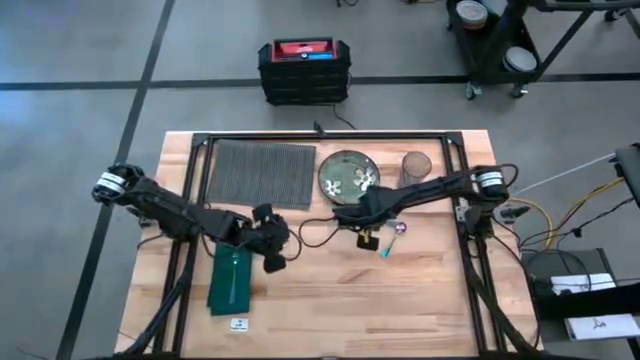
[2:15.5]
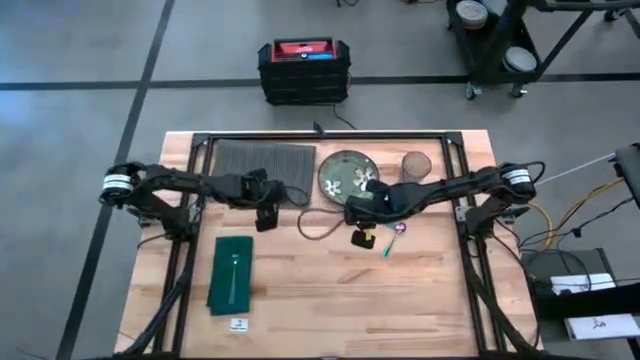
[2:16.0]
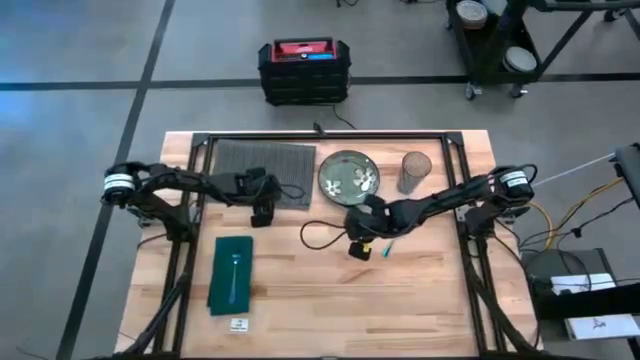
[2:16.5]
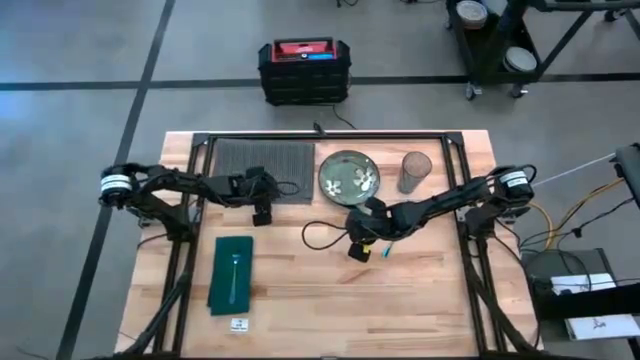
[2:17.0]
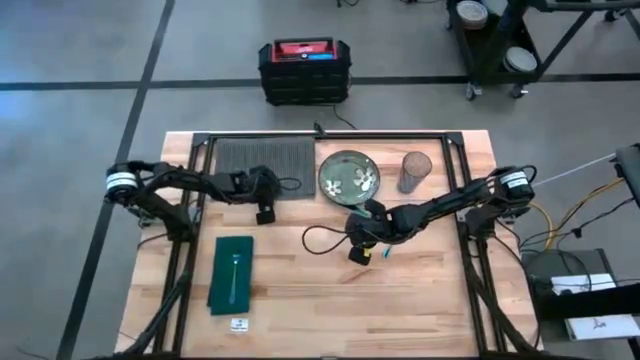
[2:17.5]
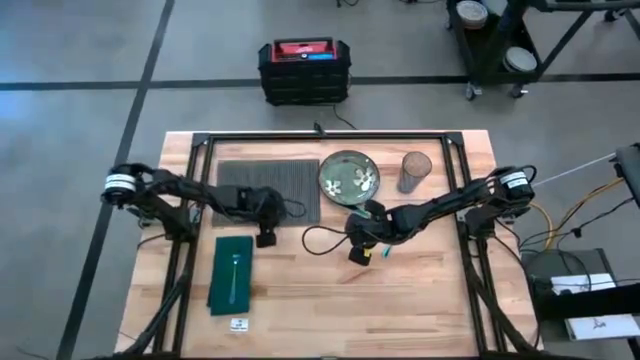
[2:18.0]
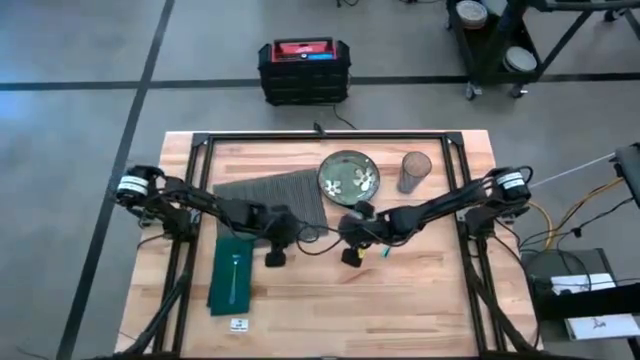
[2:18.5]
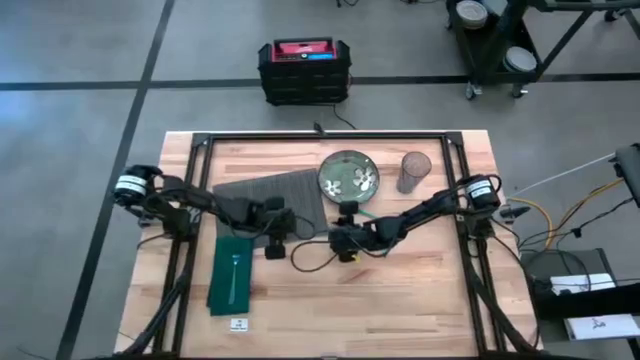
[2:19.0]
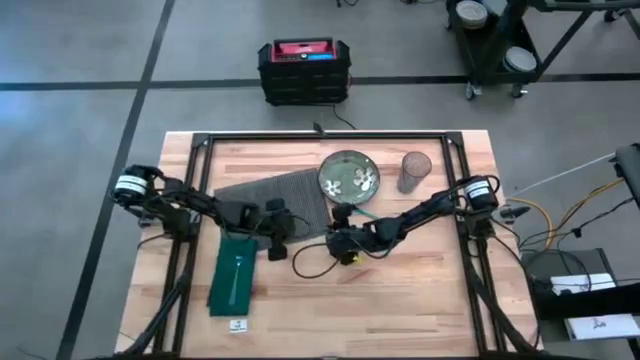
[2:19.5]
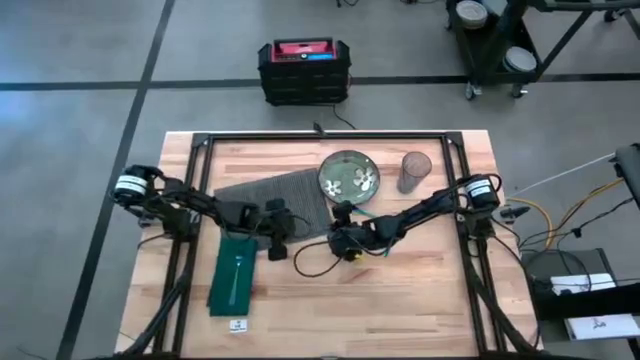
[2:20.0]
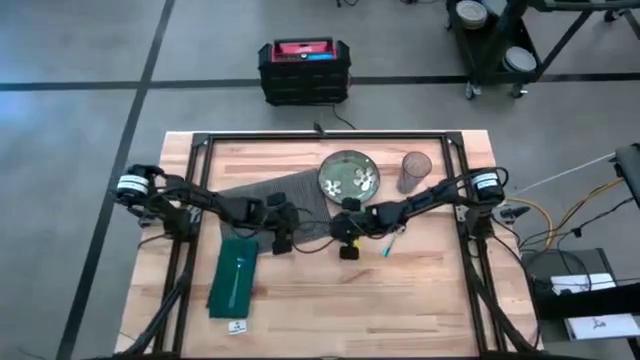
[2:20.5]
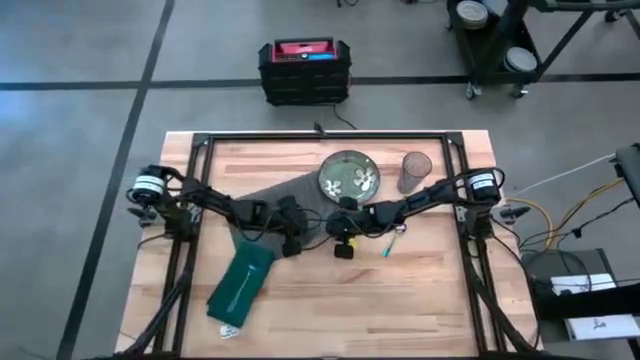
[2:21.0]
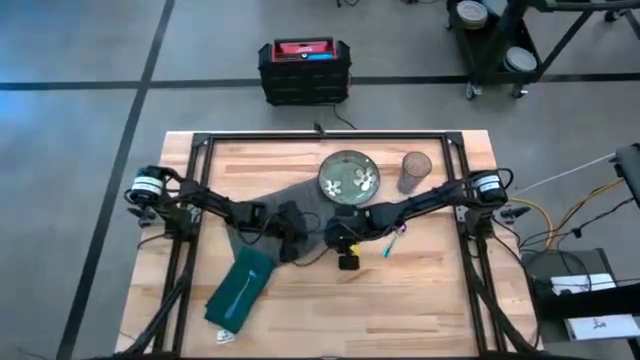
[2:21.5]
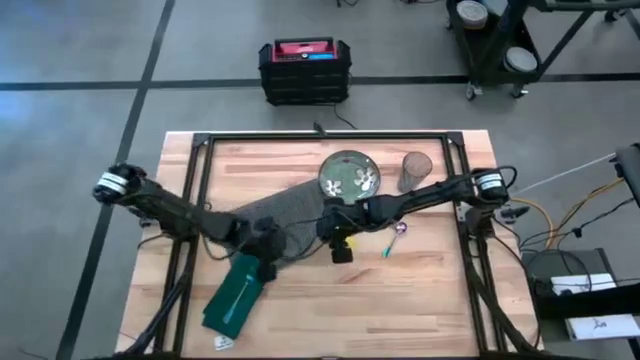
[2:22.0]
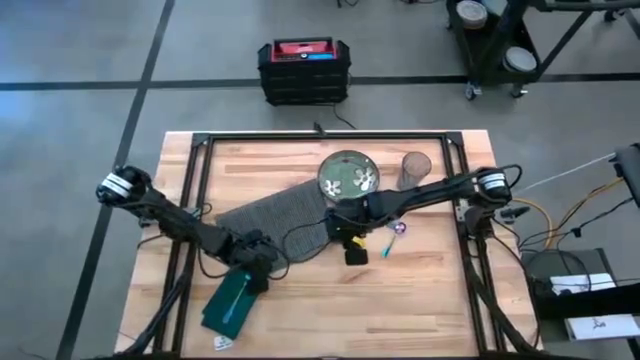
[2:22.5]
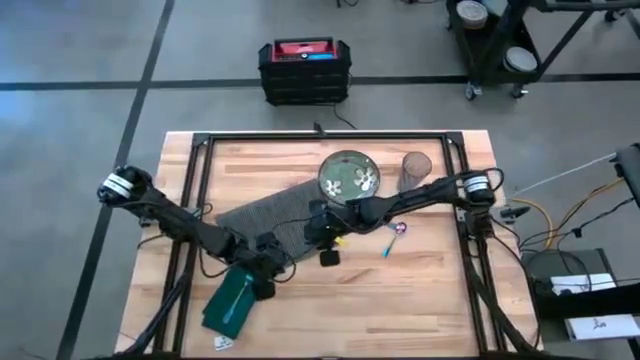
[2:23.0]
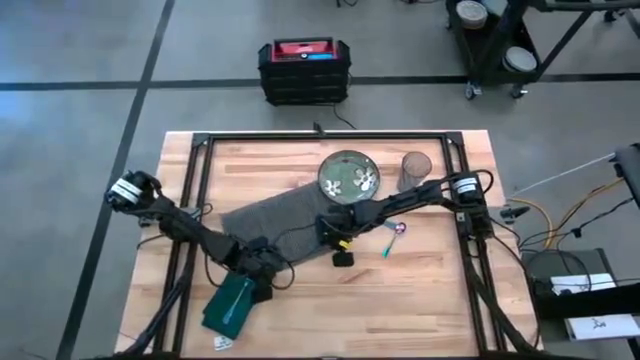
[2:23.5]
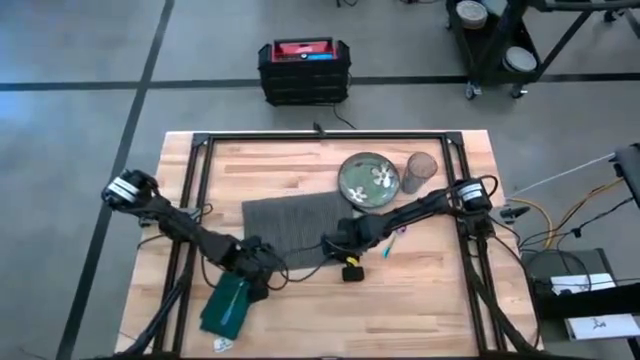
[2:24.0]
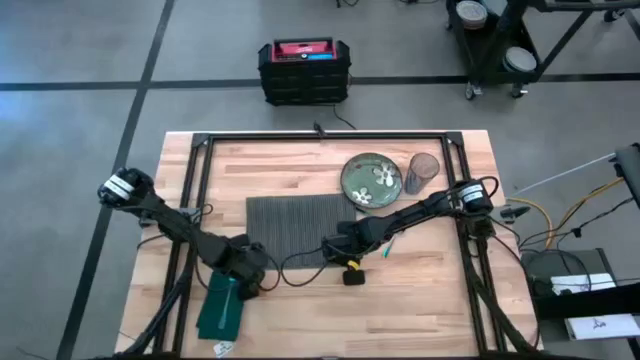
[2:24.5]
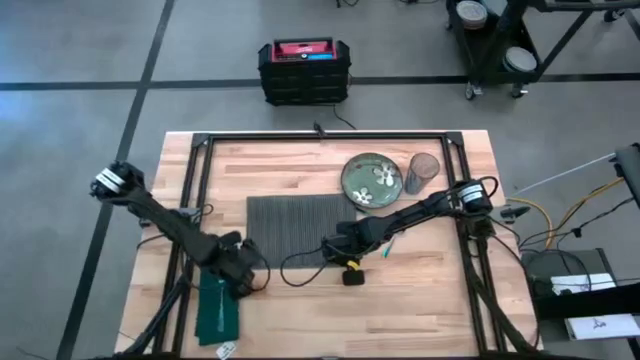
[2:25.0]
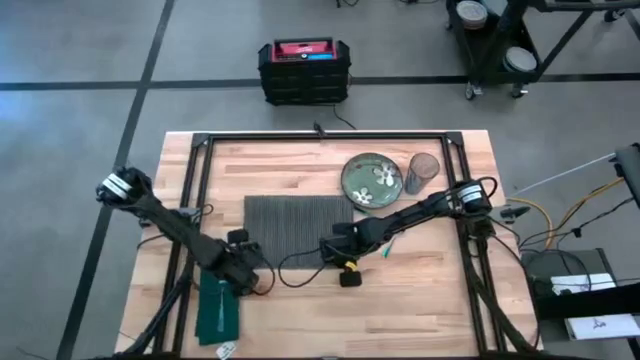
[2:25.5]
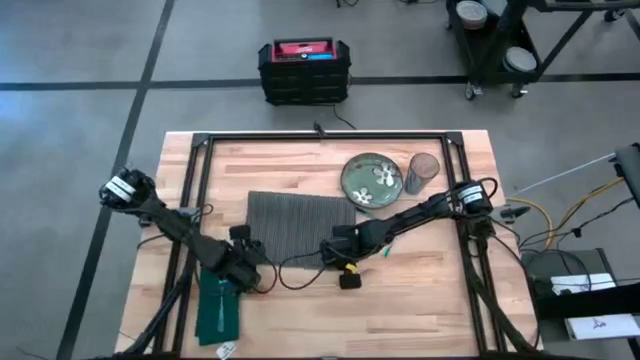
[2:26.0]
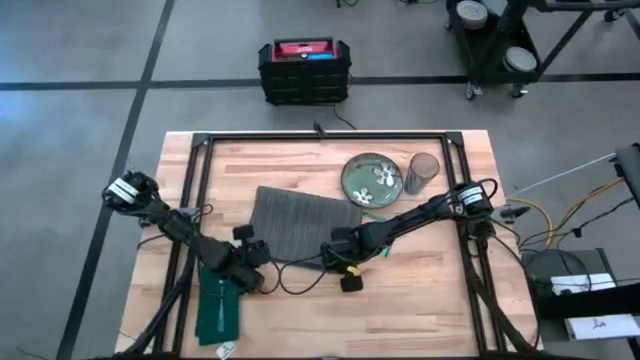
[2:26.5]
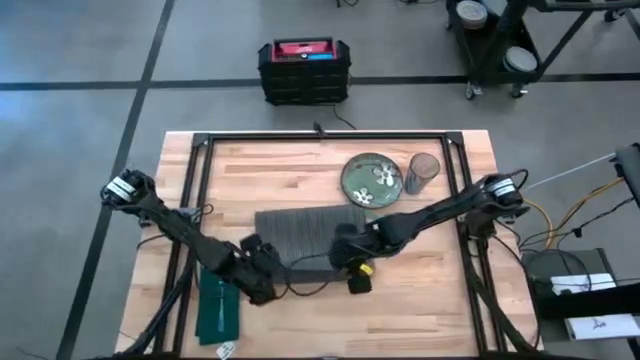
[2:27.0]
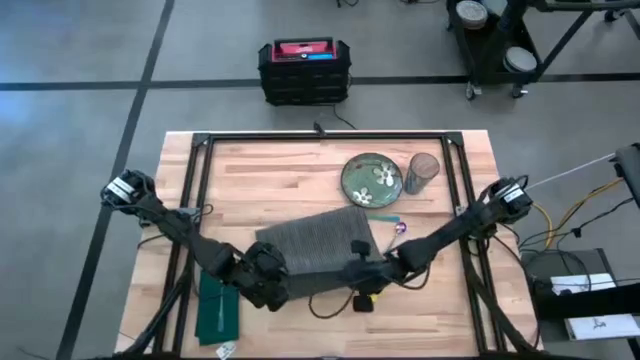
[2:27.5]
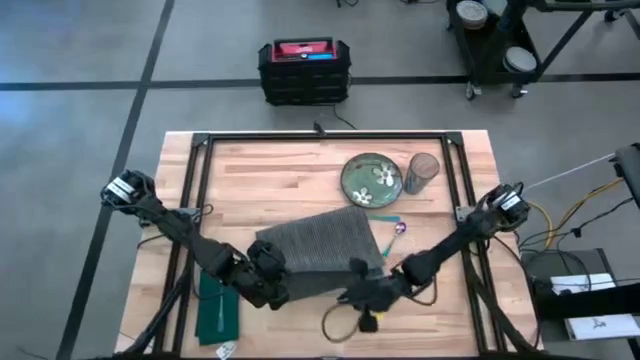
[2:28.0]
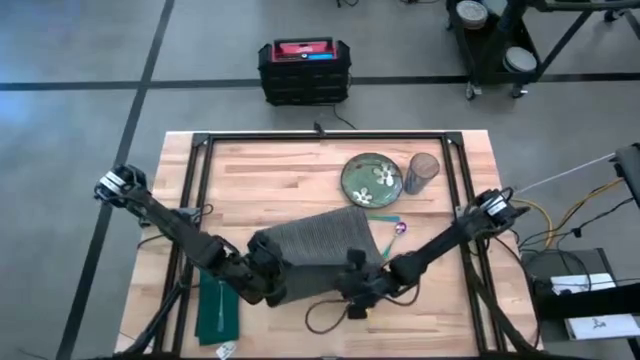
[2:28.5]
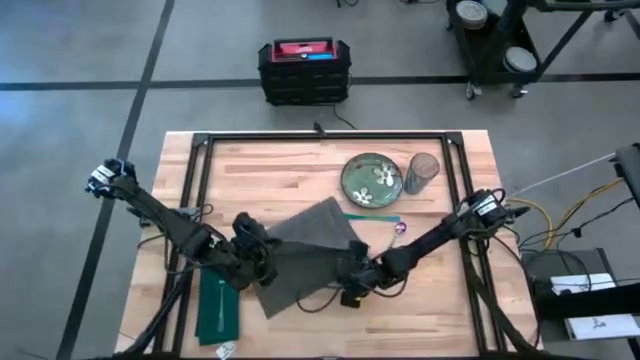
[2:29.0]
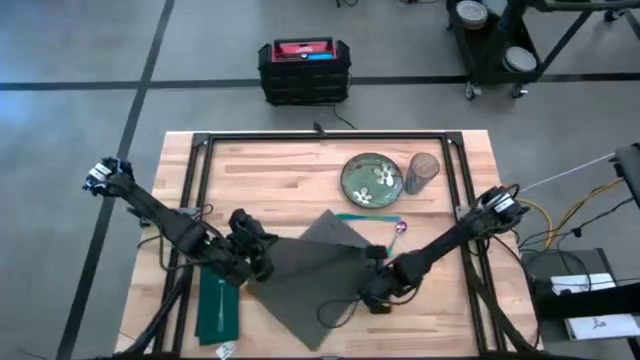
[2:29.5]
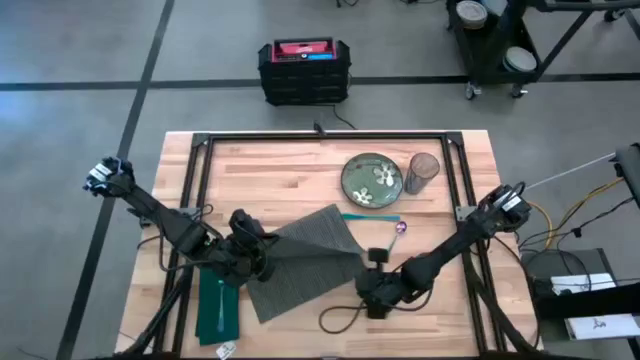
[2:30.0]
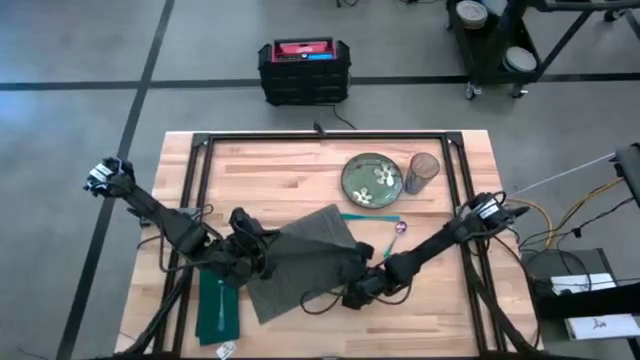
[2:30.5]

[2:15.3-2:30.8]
Task: Set table place
Move the gray place mat to the center of the table

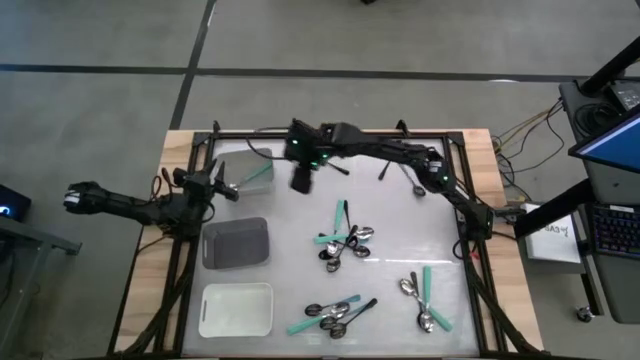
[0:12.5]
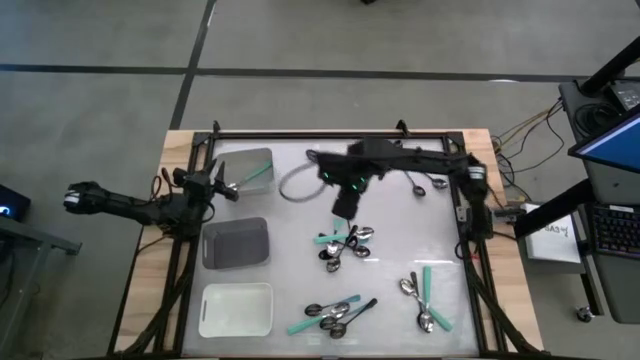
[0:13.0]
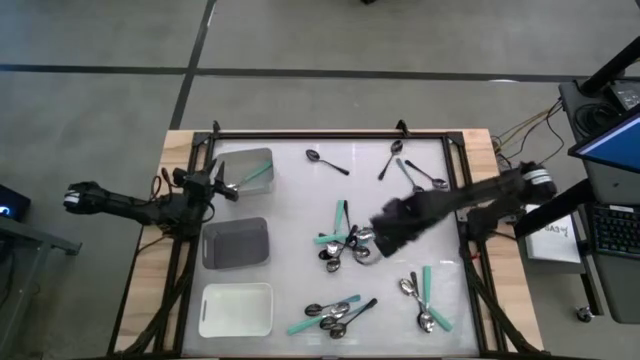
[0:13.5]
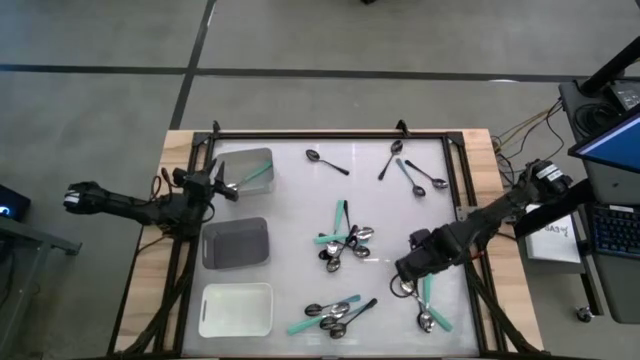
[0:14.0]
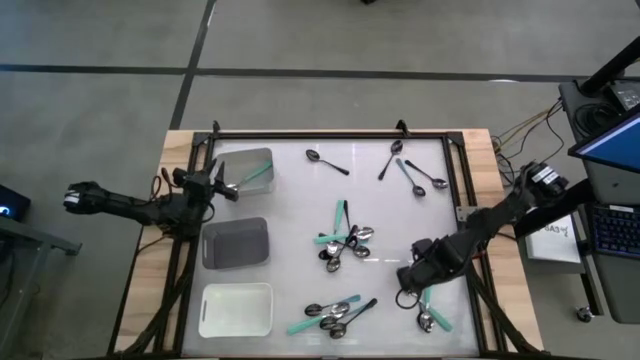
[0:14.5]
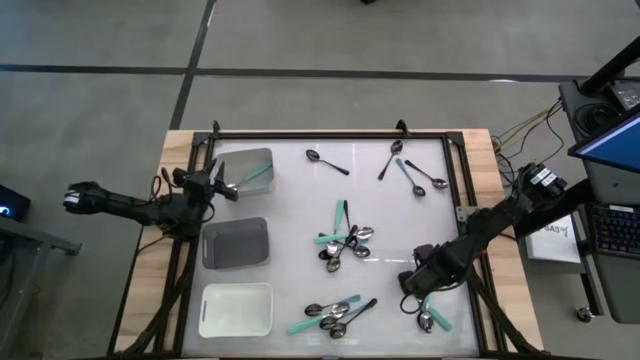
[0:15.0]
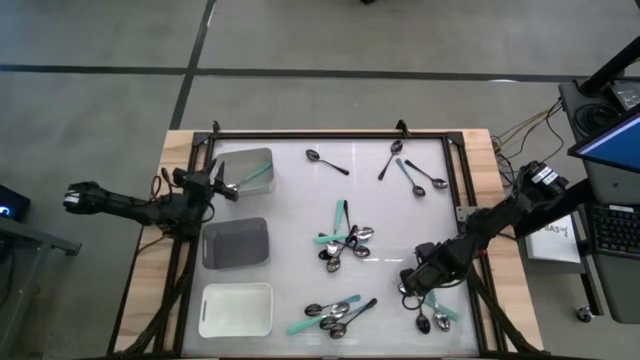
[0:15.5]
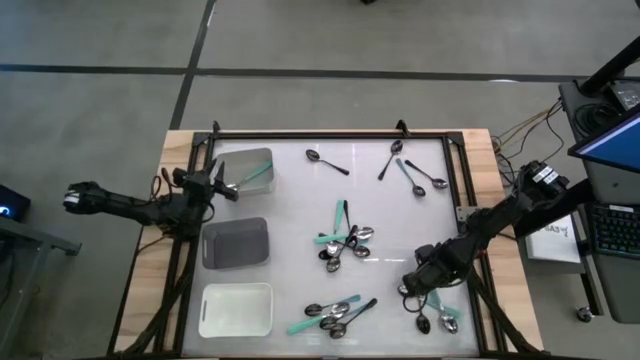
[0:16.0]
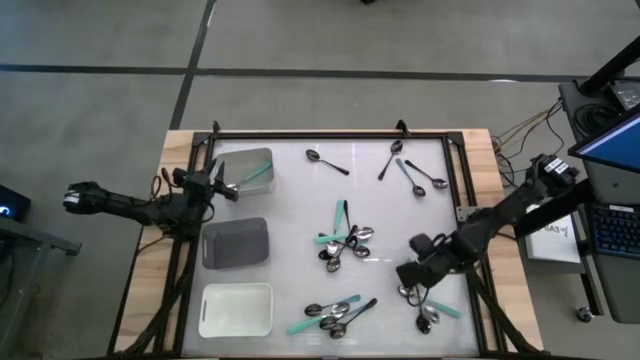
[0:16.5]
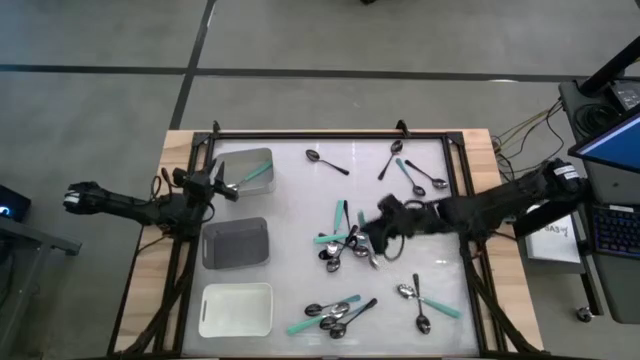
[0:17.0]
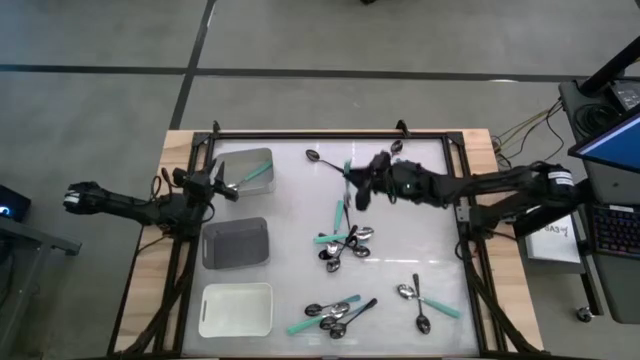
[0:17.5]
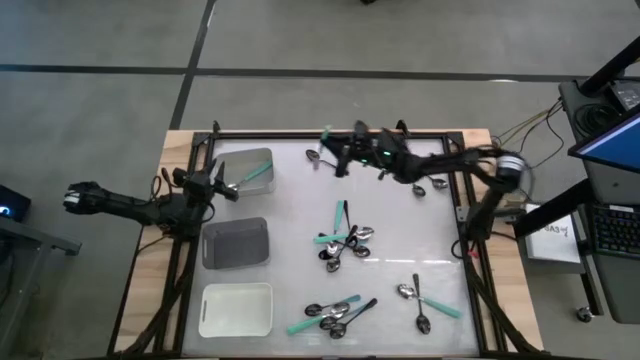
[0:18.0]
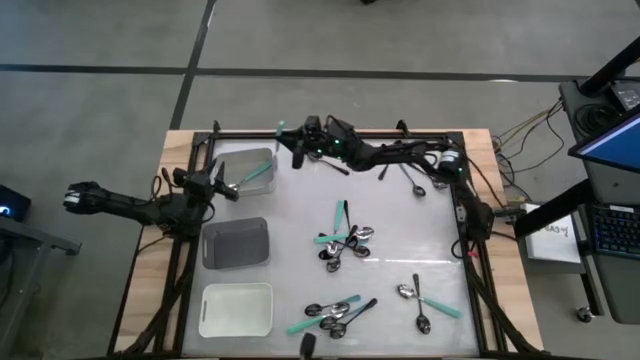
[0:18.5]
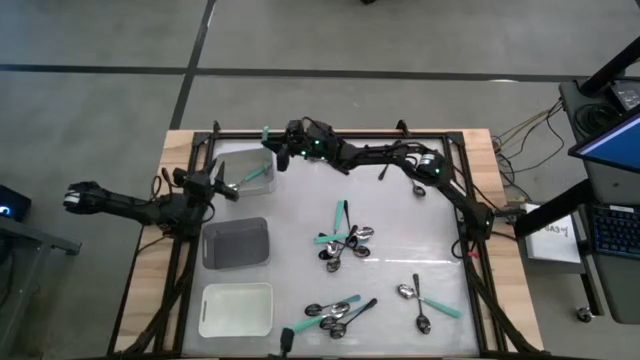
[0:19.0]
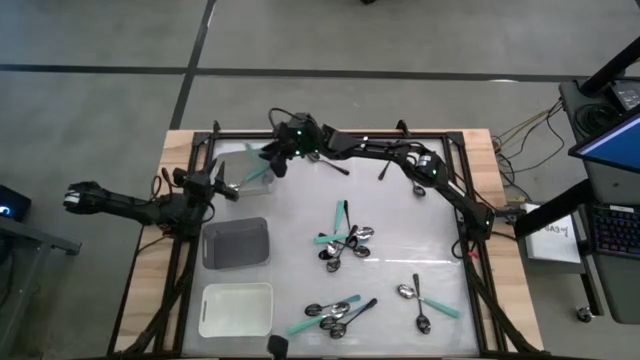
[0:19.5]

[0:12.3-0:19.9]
Task: Sort silverware by color (type)
Put the green spoon into the gray bin
